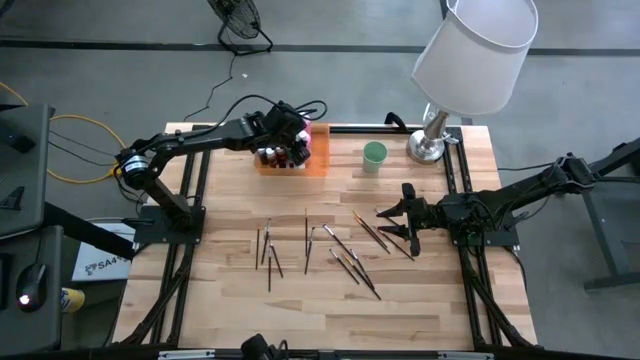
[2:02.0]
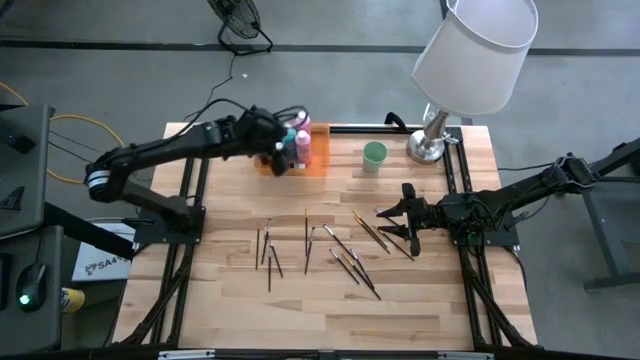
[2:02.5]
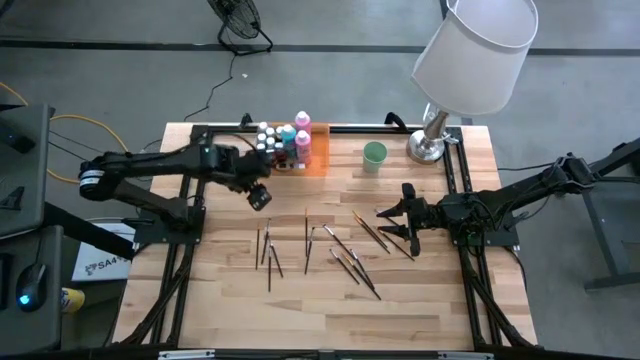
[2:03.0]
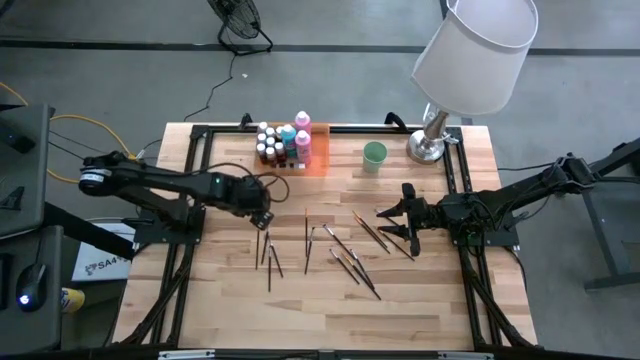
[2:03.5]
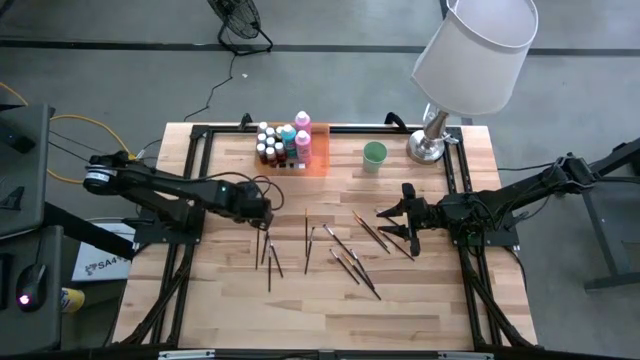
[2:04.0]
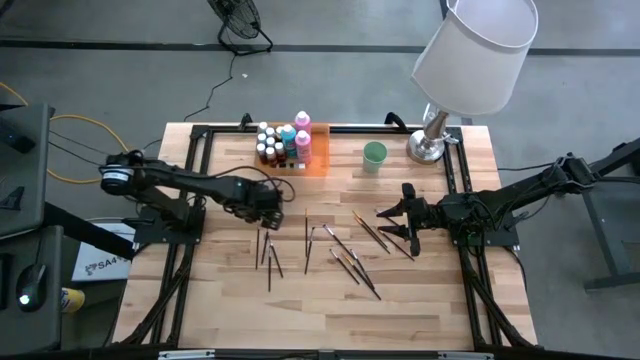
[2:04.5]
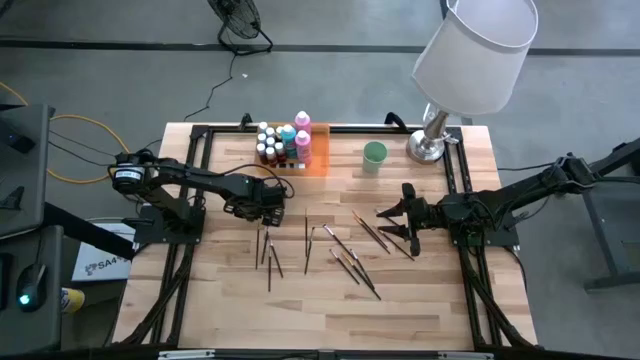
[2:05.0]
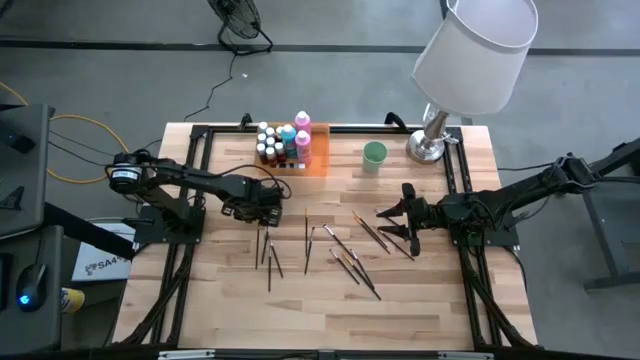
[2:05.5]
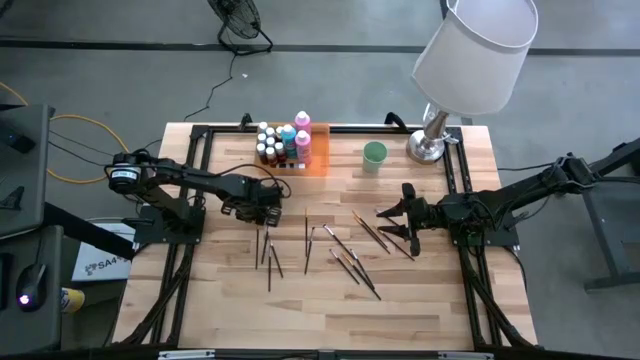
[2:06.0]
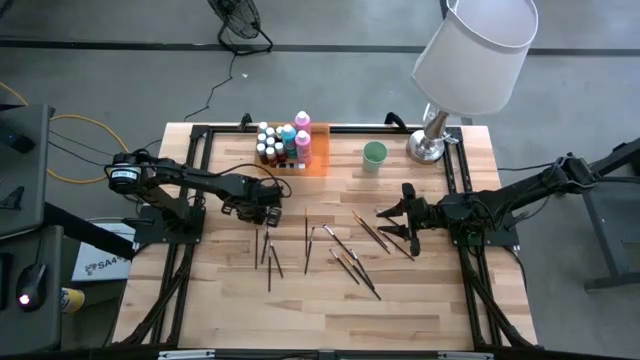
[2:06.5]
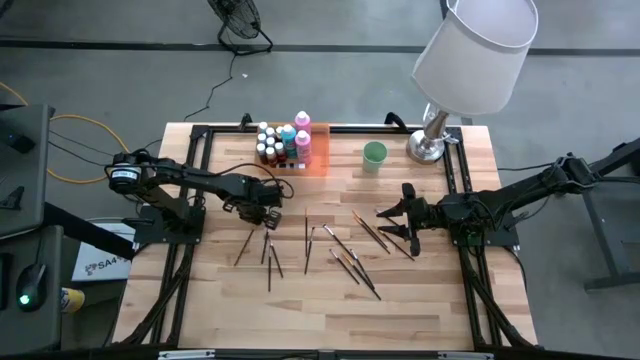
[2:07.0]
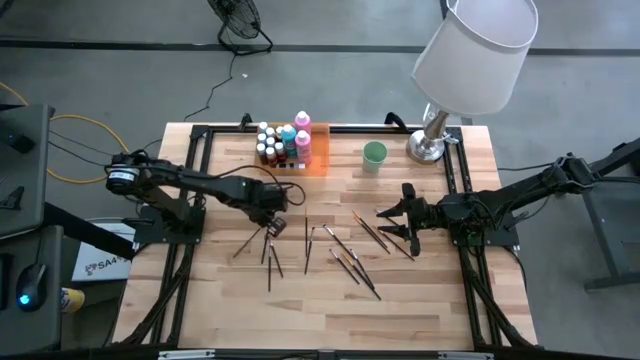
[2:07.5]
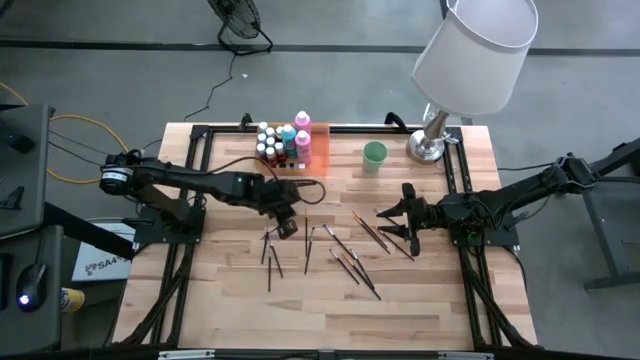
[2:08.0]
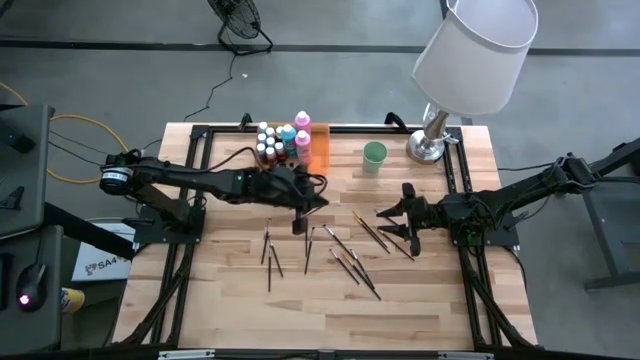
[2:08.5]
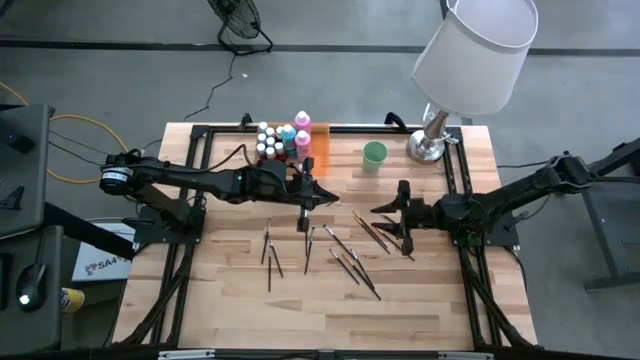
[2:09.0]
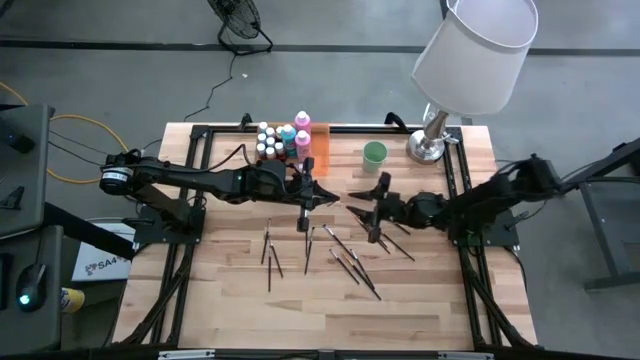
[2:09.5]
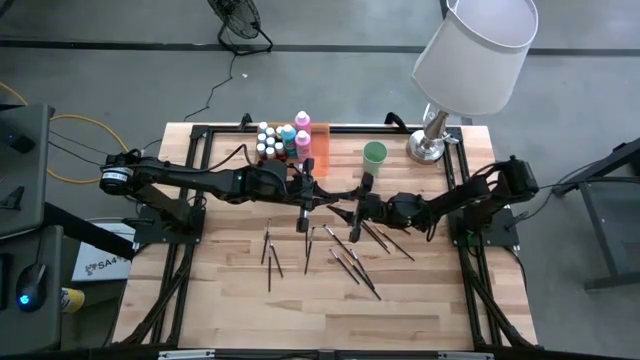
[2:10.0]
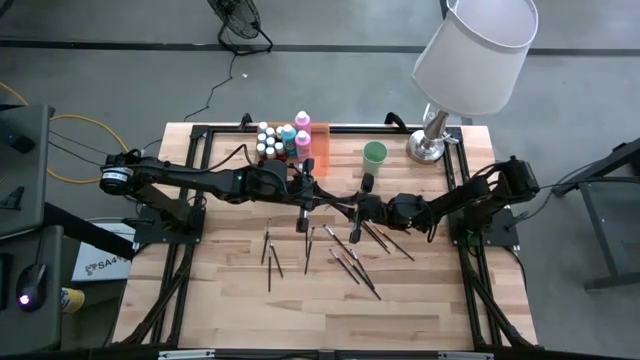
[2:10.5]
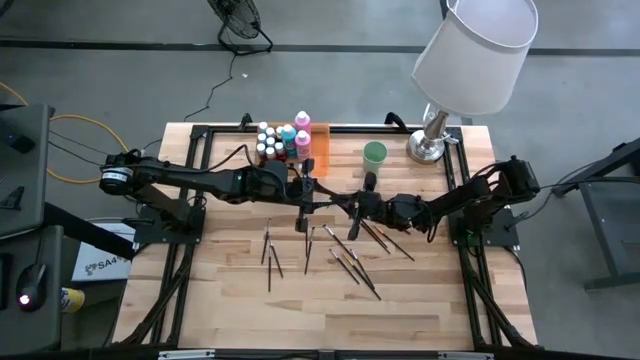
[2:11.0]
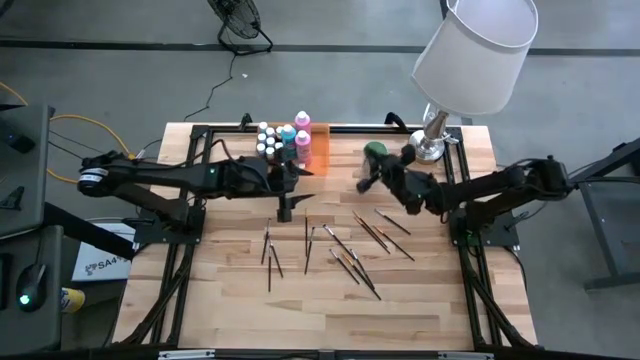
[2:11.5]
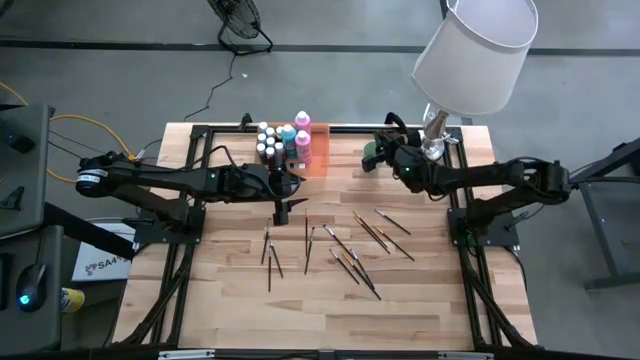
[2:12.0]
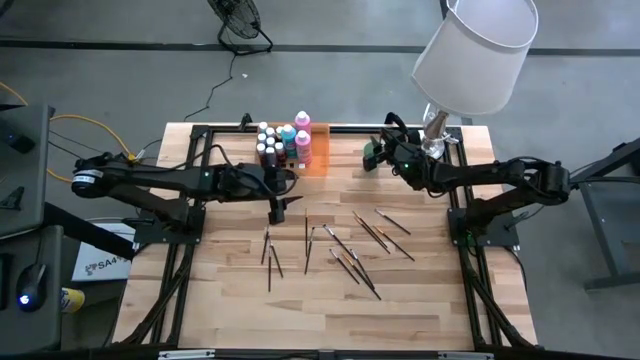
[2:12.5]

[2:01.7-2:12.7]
Task: Pick & Place Paint Supplies
Put the gold paint brush into the green cup

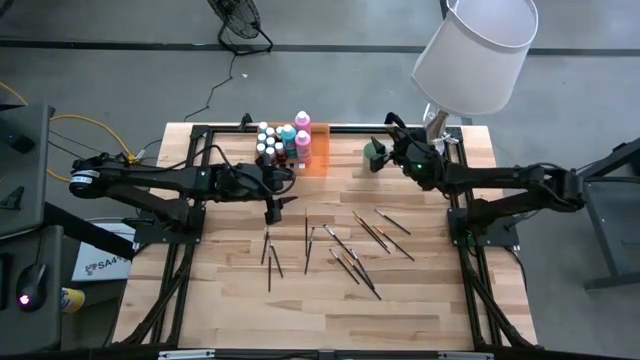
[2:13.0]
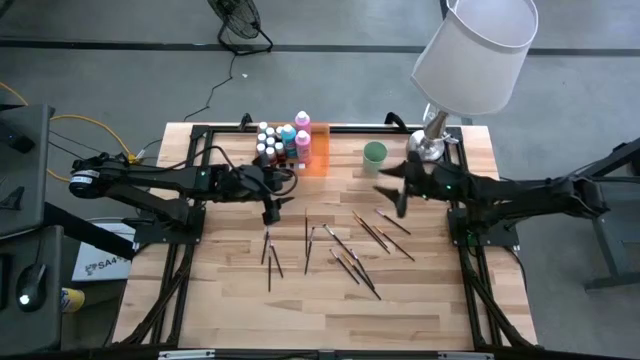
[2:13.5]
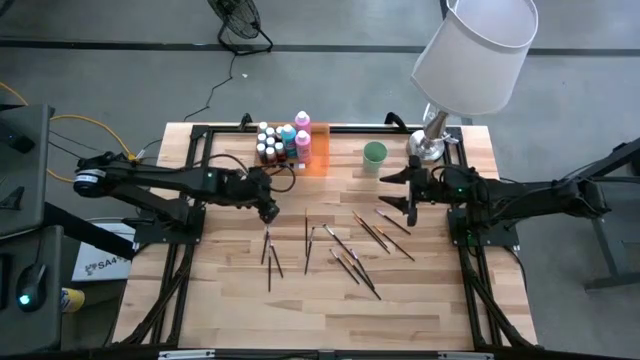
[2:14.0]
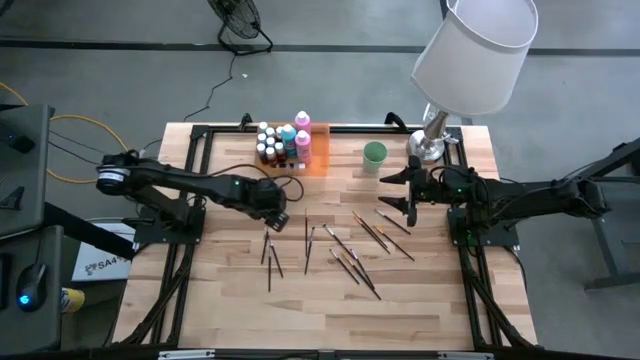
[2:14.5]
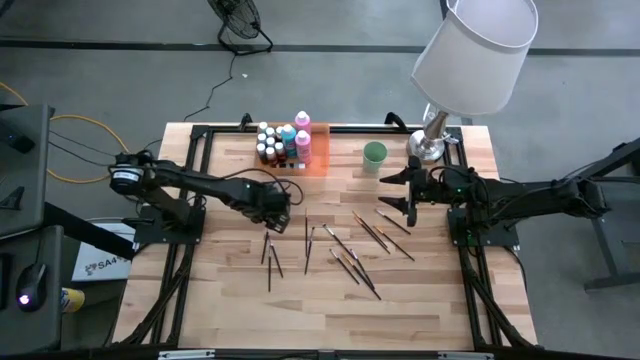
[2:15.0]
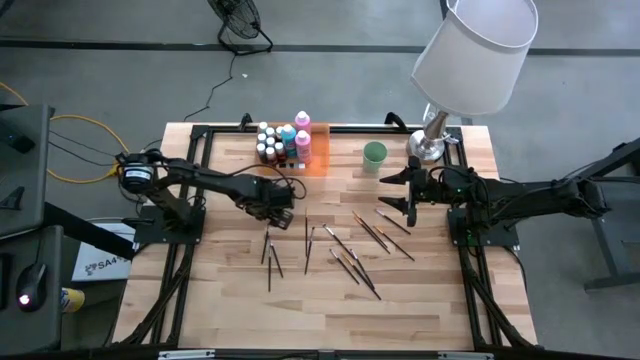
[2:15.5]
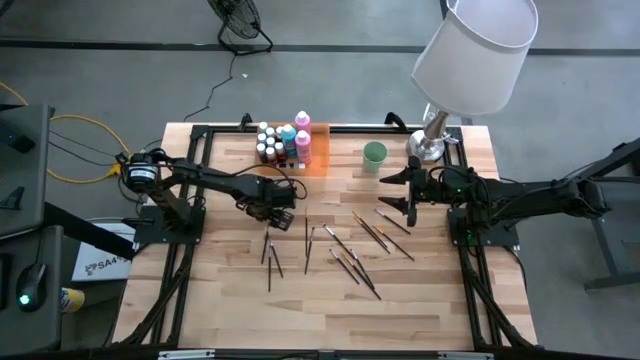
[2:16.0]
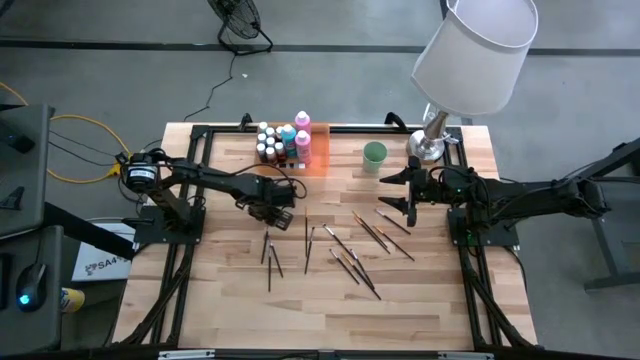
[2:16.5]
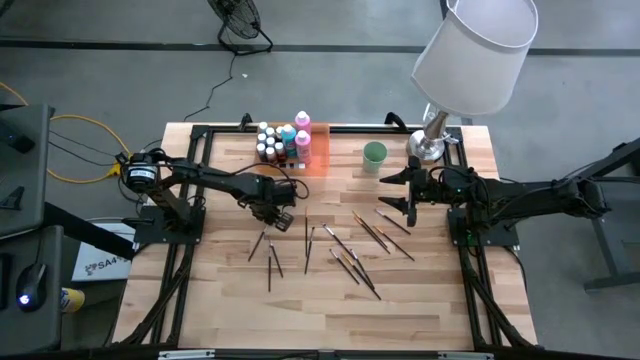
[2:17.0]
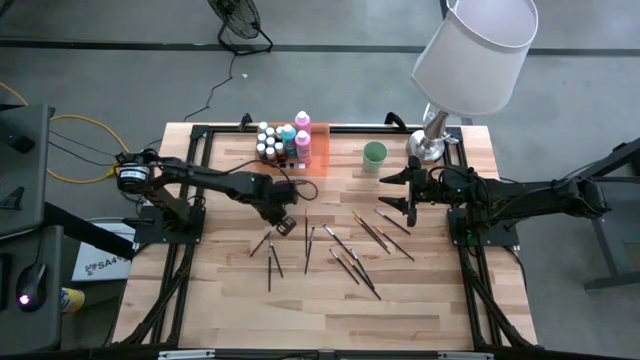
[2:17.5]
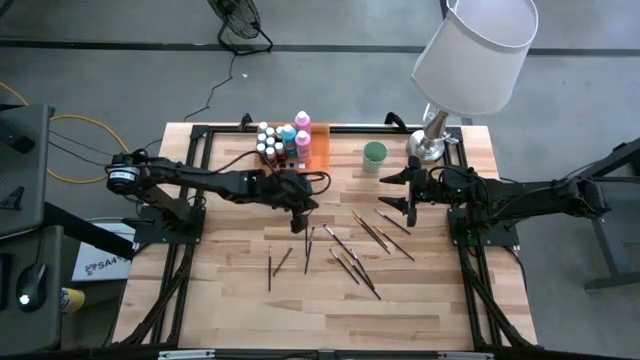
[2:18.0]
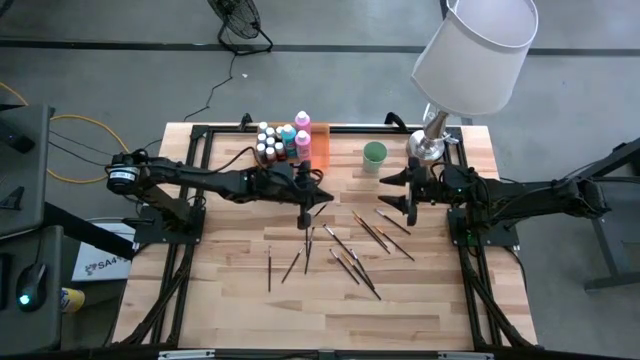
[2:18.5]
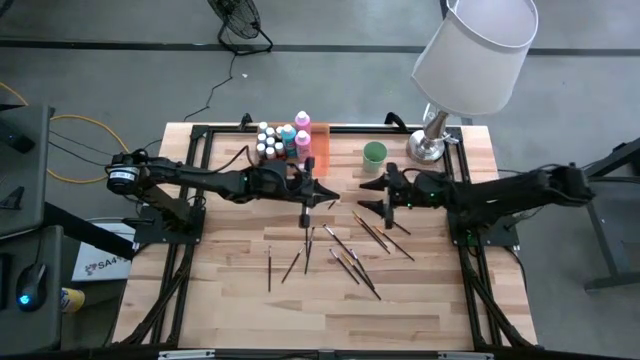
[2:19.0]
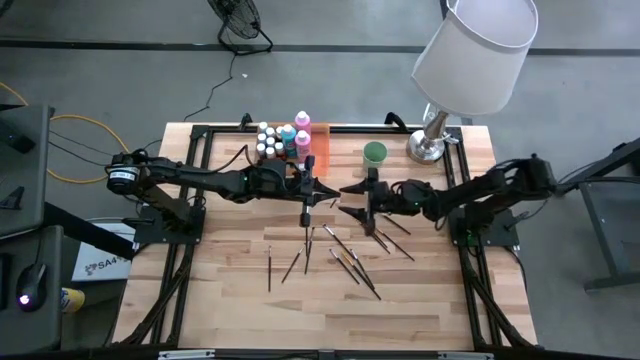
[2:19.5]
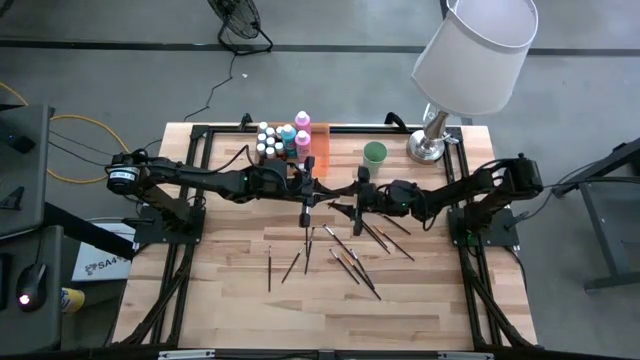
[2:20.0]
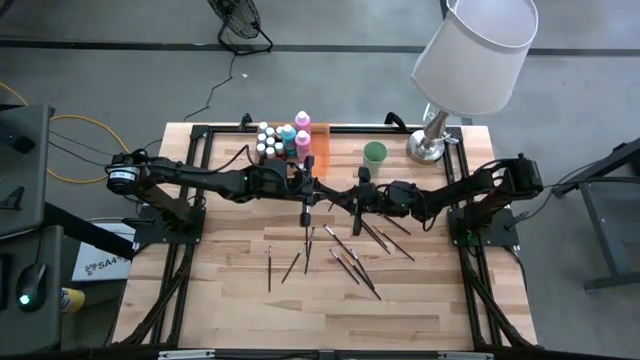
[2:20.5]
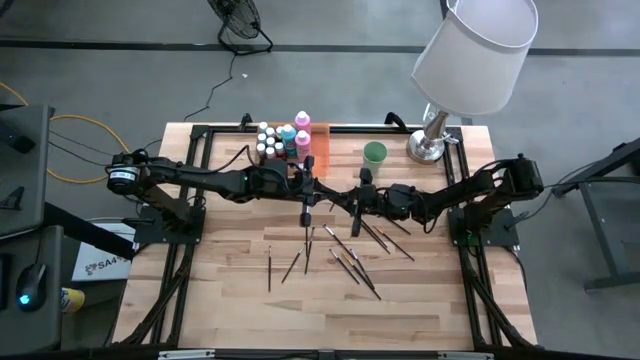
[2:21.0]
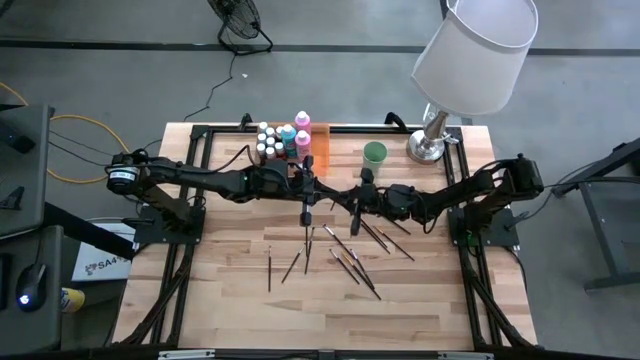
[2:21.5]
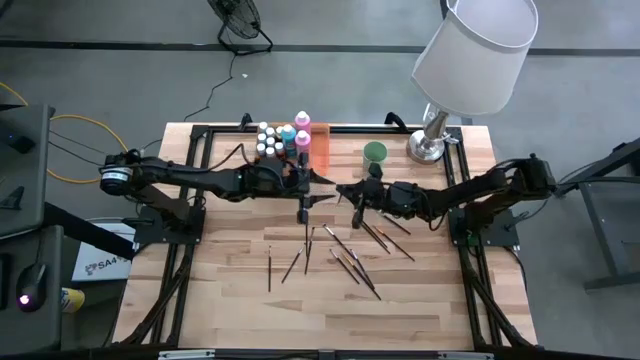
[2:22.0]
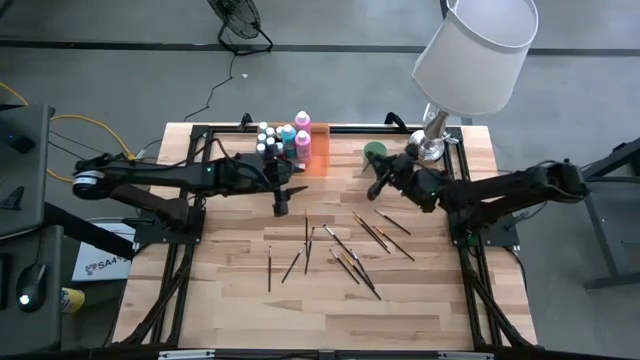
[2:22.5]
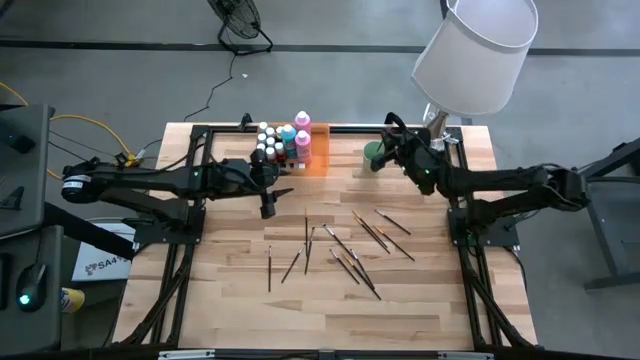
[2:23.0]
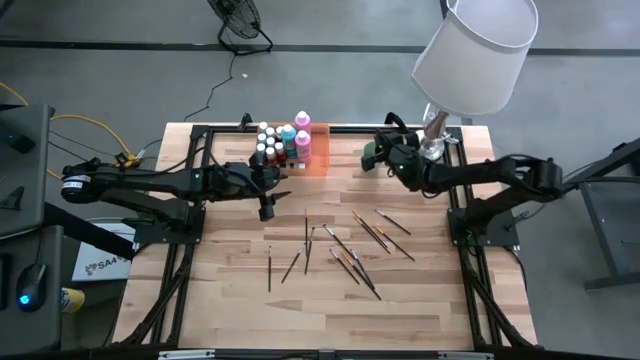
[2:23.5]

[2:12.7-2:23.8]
Put the silver paint brush into the green cup
